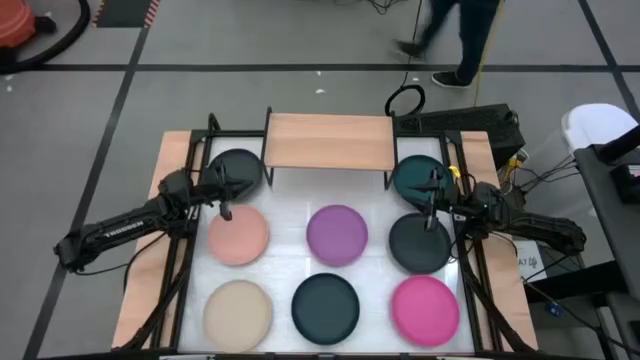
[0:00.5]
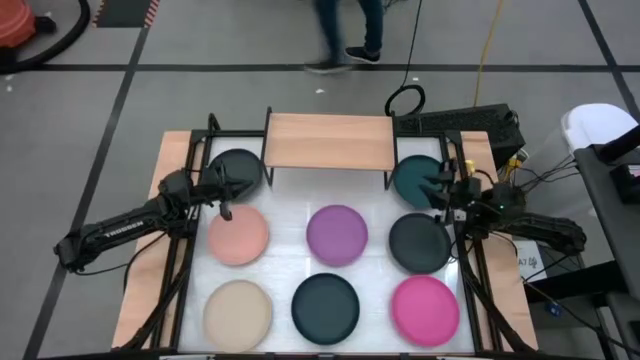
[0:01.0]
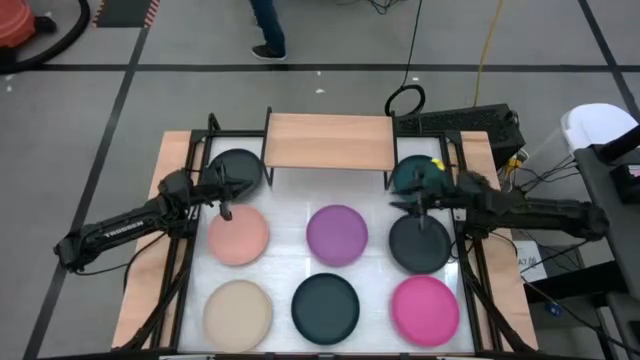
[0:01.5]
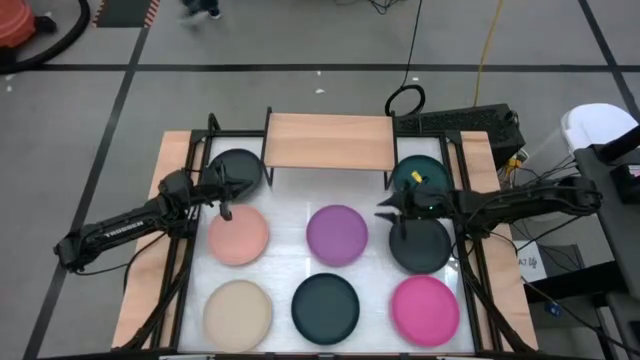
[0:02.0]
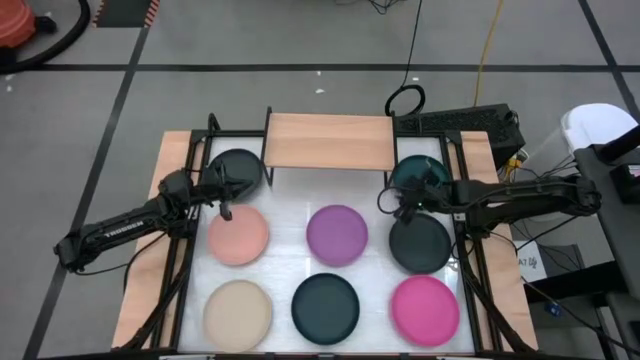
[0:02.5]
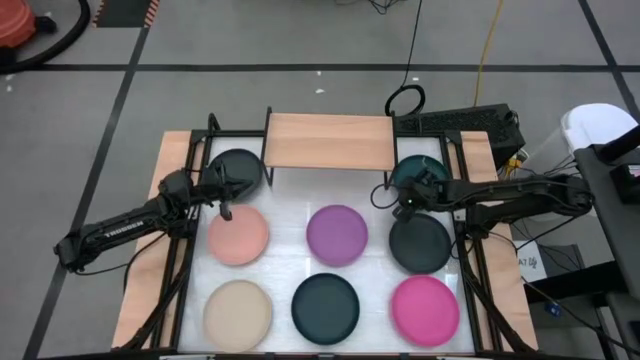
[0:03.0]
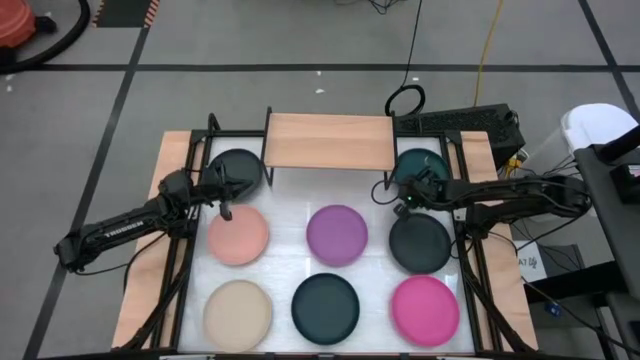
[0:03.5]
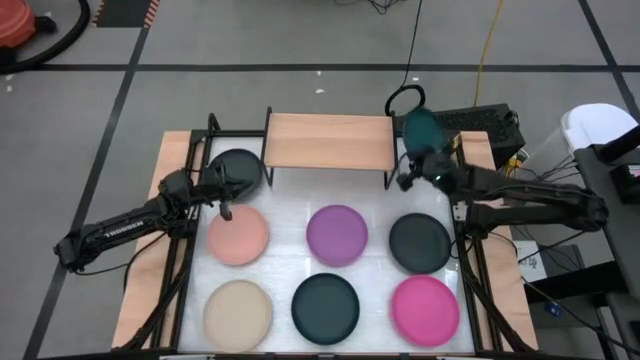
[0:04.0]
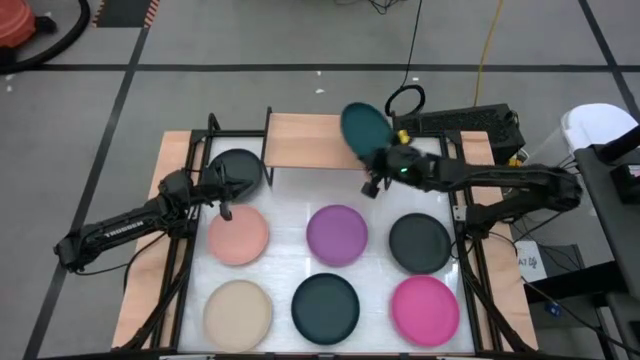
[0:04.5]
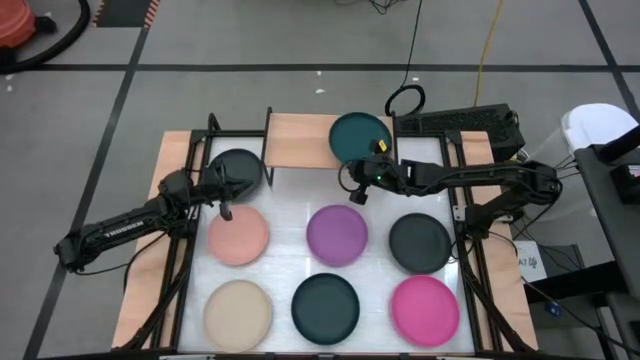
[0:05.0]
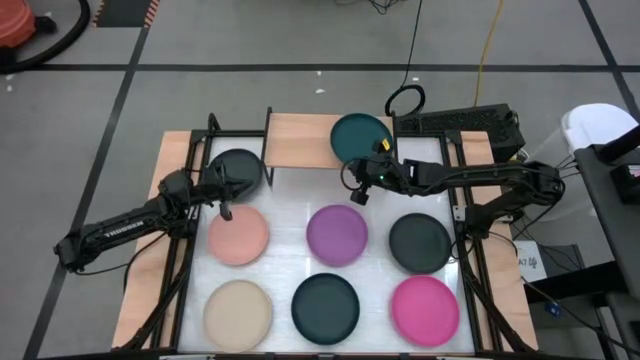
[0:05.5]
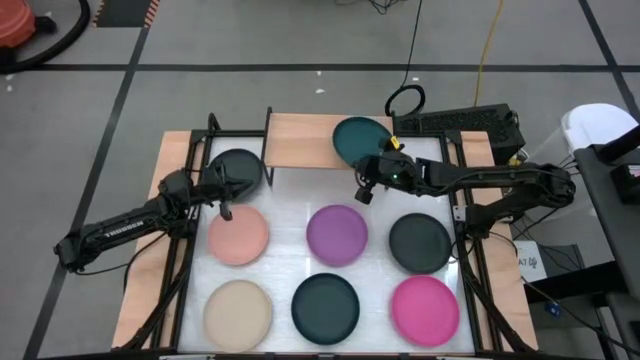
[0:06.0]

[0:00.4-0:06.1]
Task: Place and stack plates onto a shelf
Put the top dark green plate on the shelf

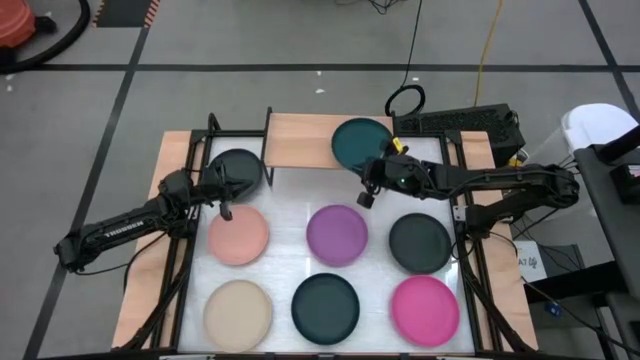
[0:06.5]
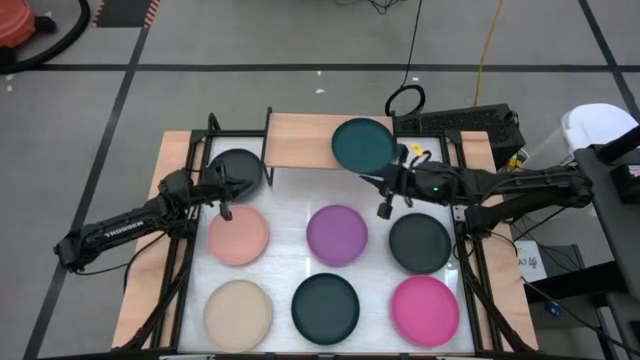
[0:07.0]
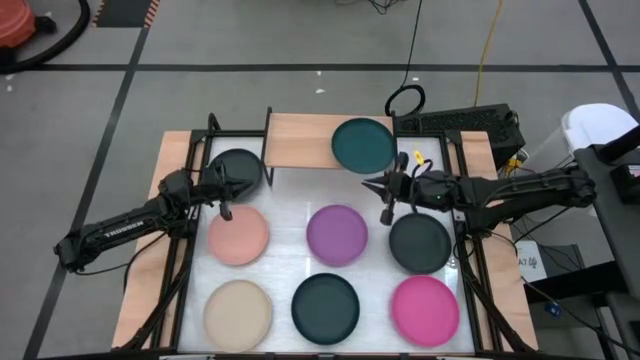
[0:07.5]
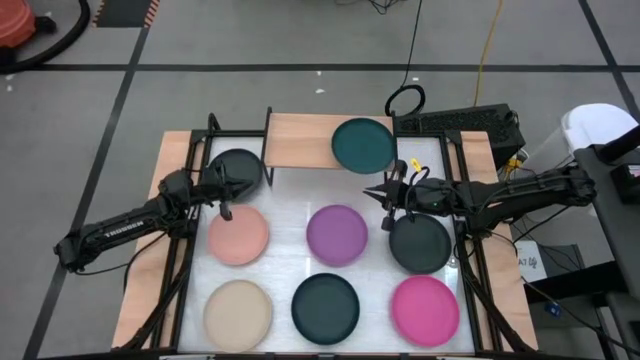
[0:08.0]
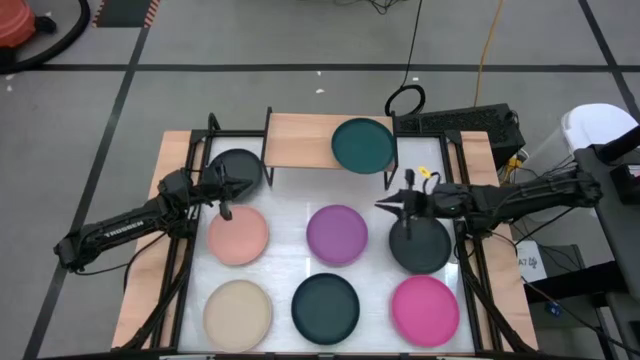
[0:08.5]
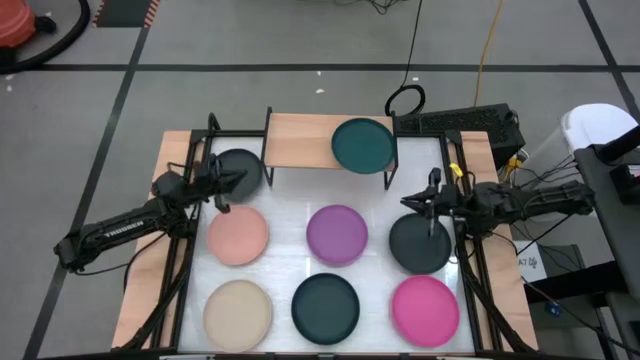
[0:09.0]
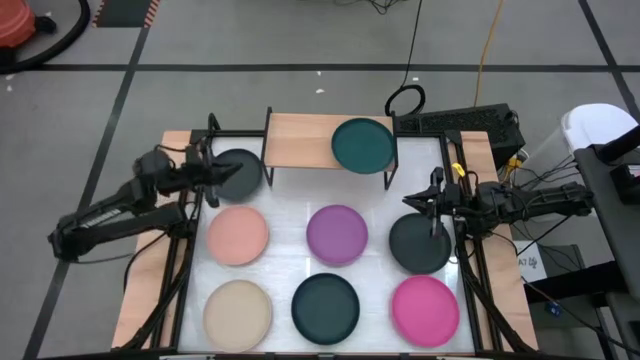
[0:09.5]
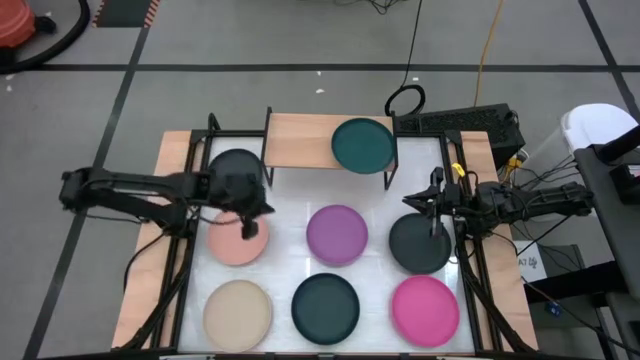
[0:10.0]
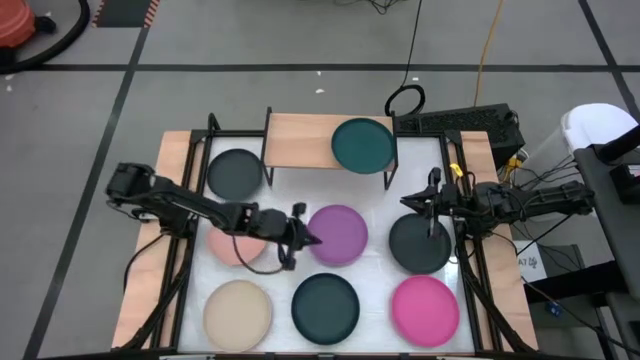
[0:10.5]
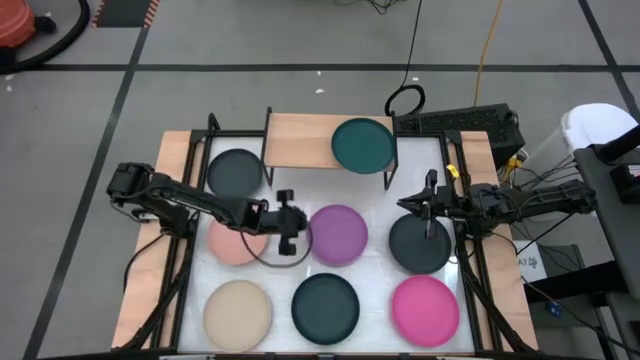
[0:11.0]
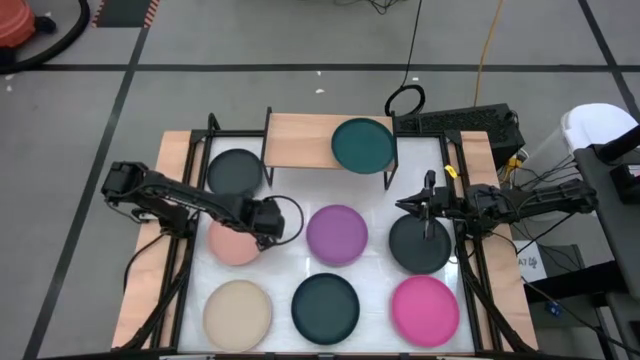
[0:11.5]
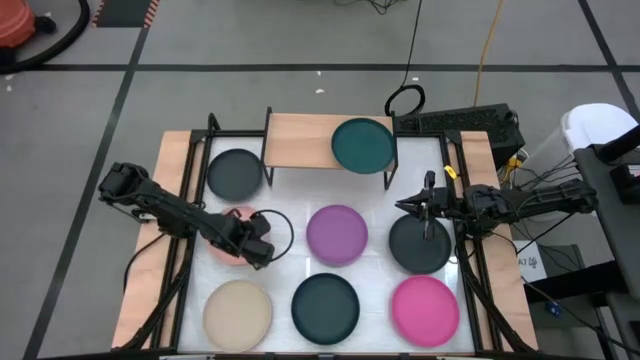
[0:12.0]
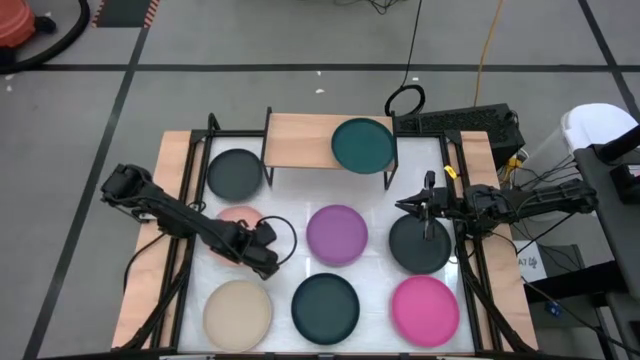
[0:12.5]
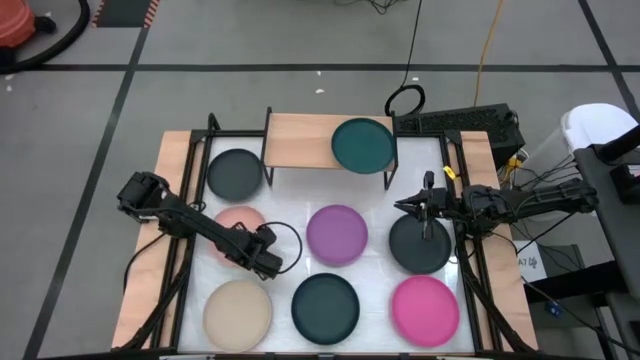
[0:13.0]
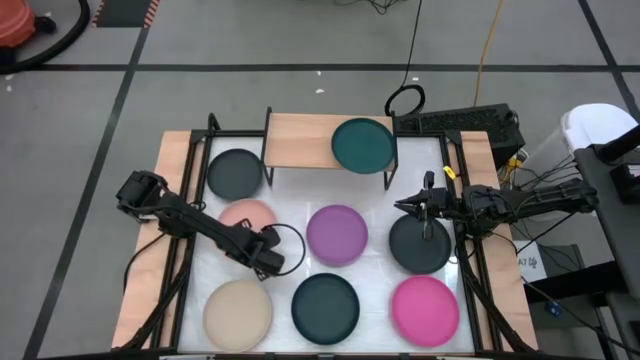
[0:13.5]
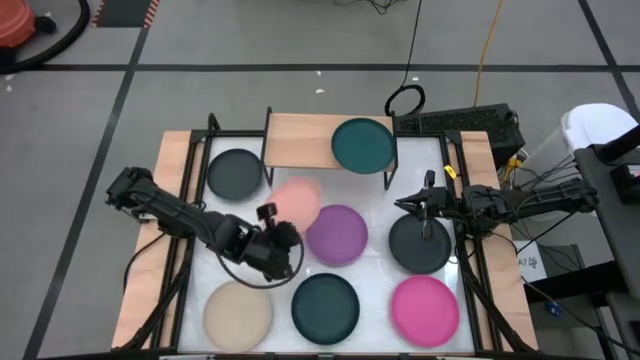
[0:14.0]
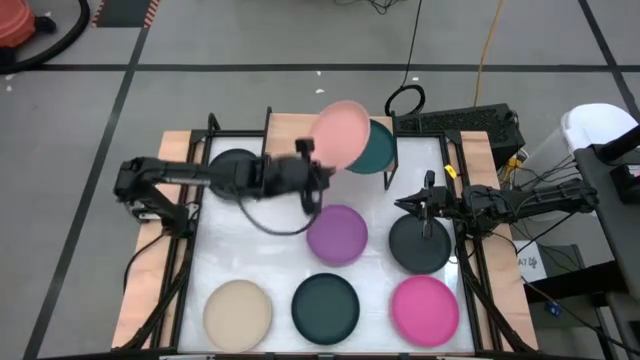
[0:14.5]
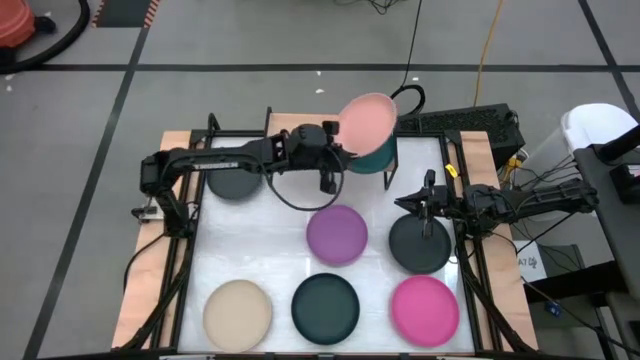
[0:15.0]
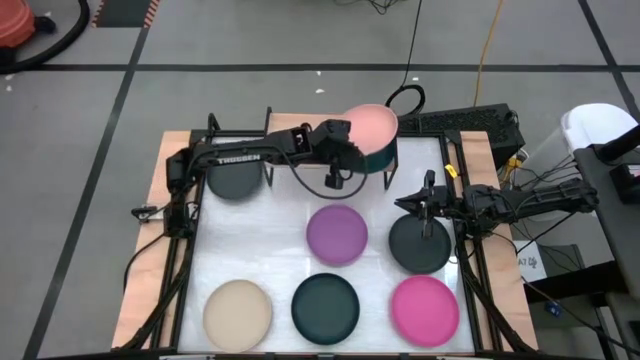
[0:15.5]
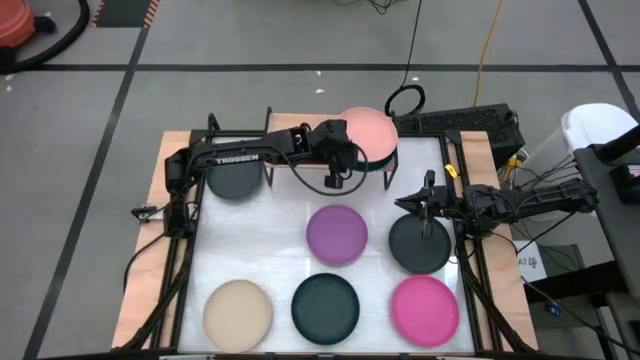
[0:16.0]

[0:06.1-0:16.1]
Stack the light orange plate on top of the dark green plate on the shelf

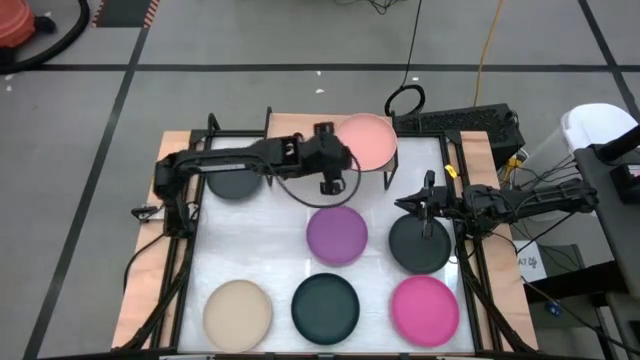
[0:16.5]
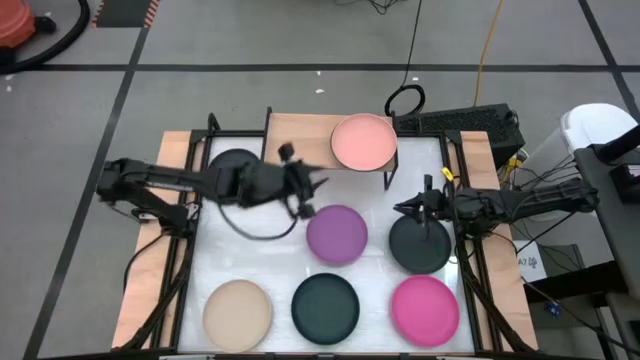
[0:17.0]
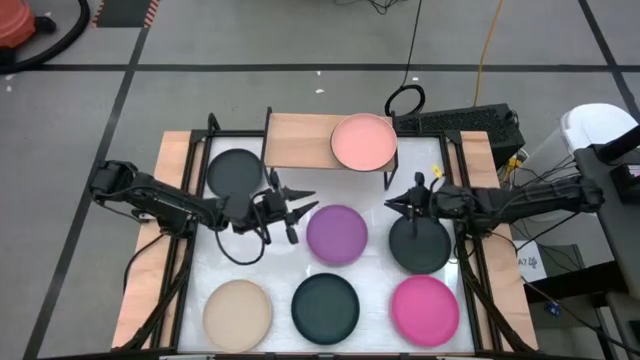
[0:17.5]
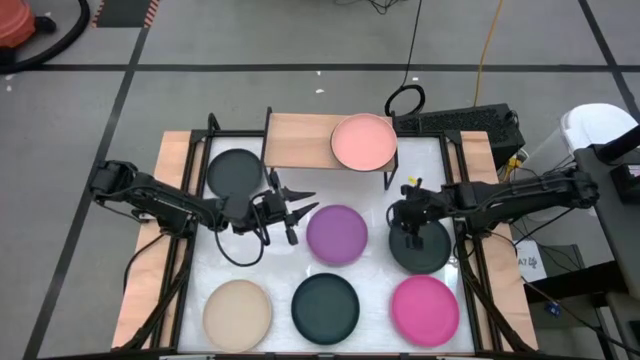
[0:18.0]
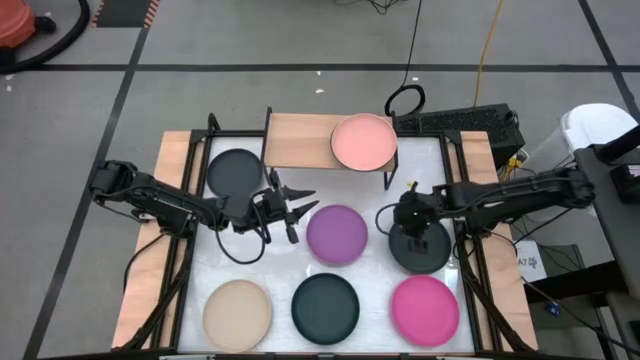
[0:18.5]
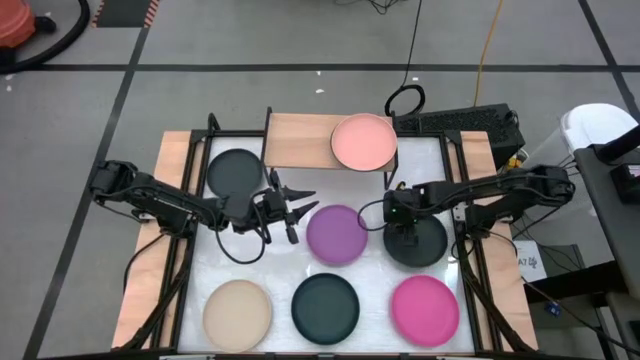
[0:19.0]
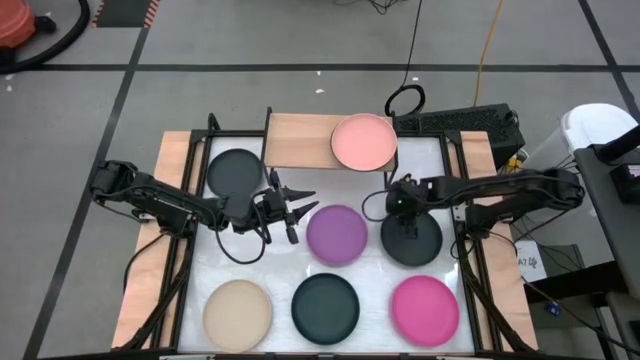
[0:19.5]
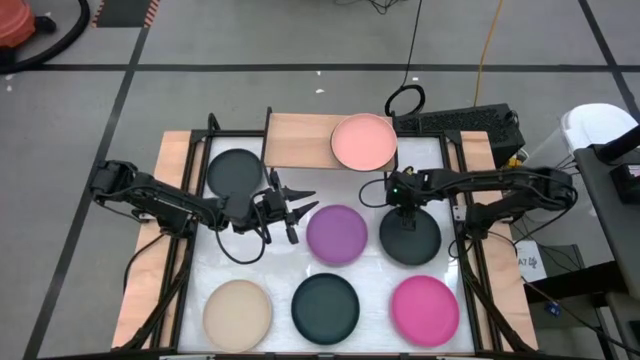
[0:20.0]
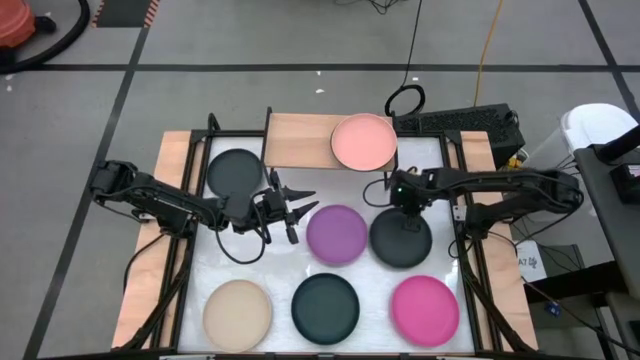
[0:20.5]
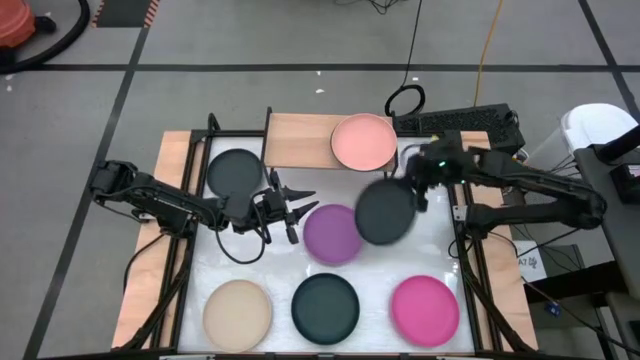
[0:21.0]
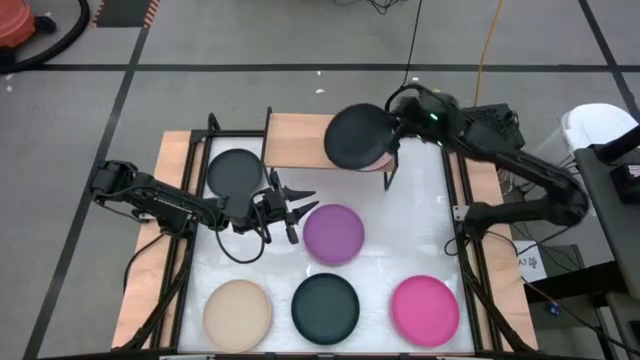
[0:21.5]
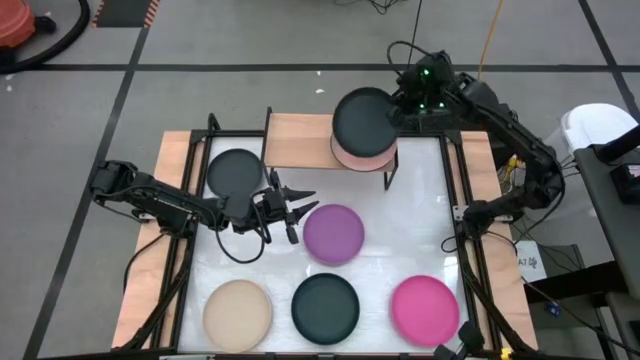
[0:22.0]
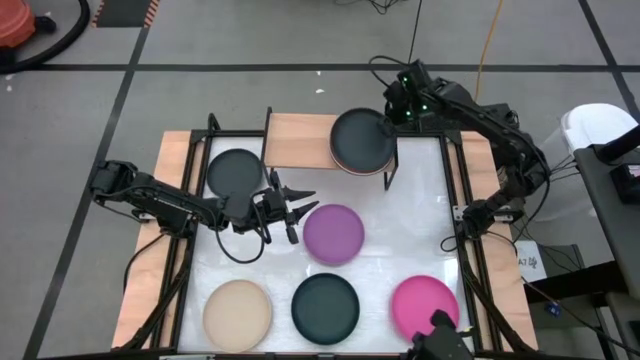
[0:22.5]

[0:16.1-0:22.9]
Stack the bottom black plate on top of the light orange plate on the shelf
